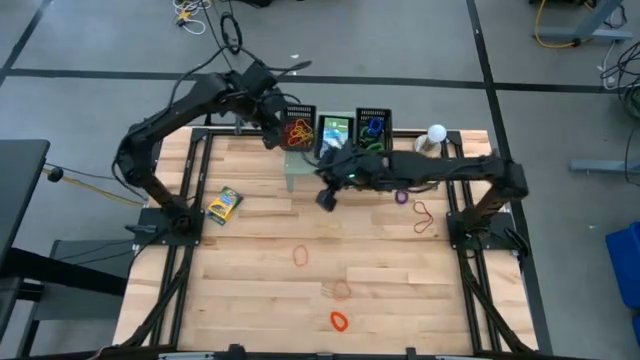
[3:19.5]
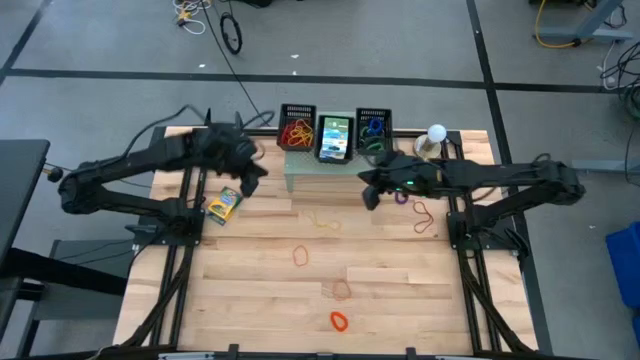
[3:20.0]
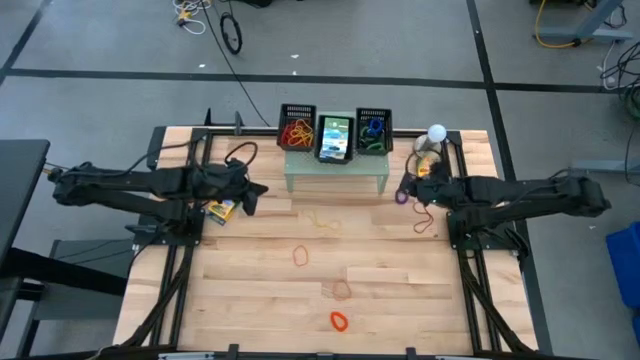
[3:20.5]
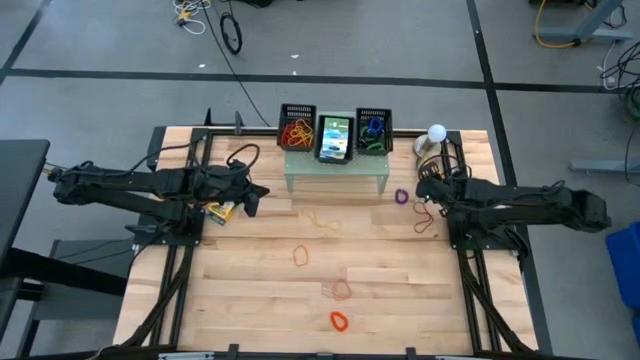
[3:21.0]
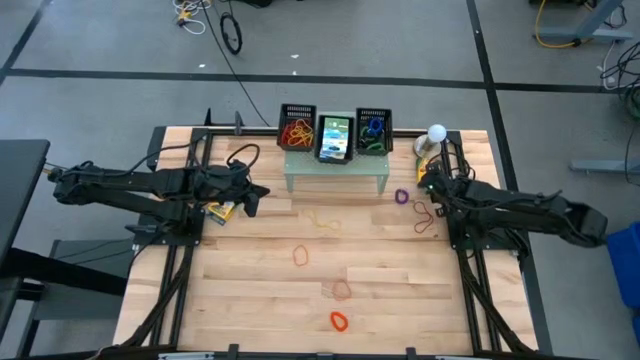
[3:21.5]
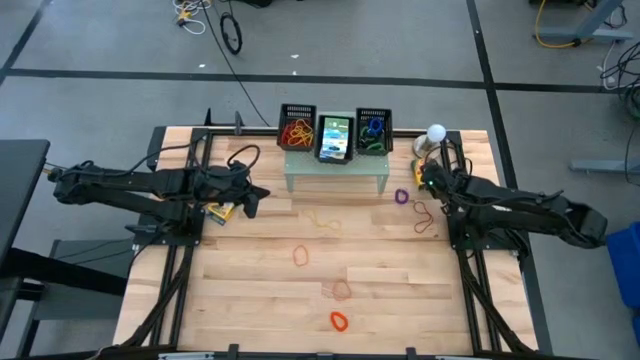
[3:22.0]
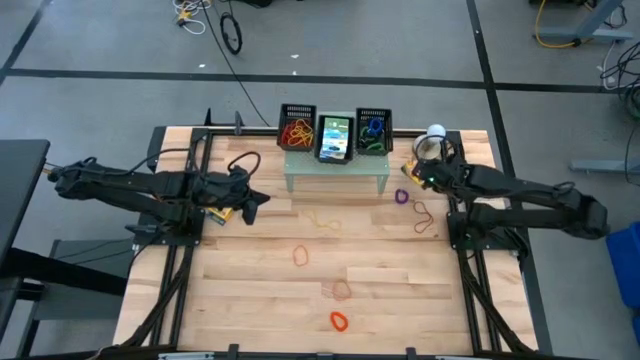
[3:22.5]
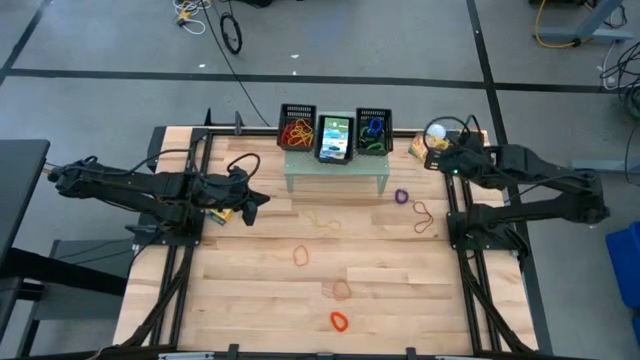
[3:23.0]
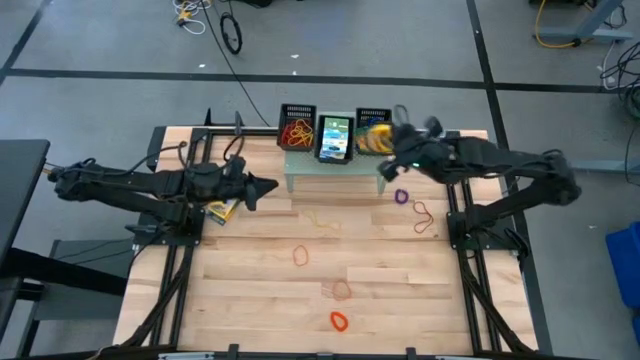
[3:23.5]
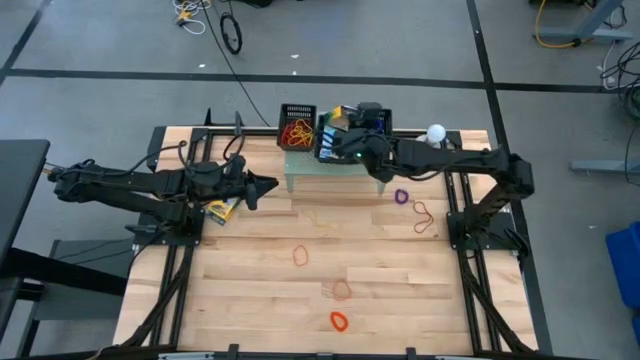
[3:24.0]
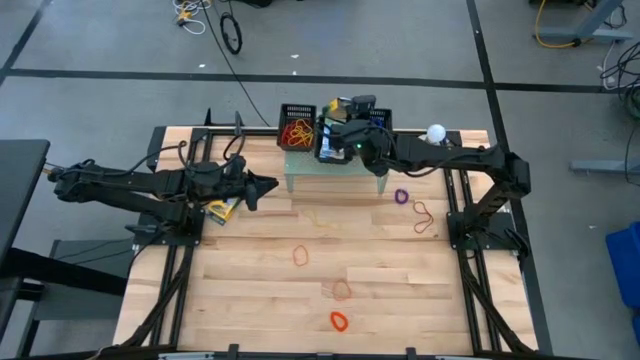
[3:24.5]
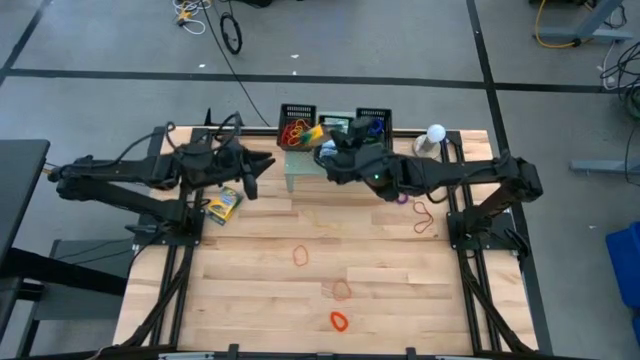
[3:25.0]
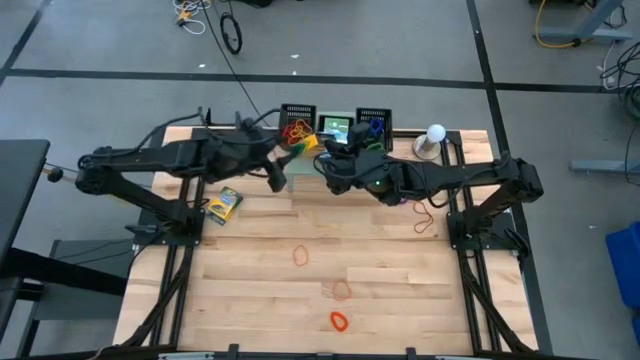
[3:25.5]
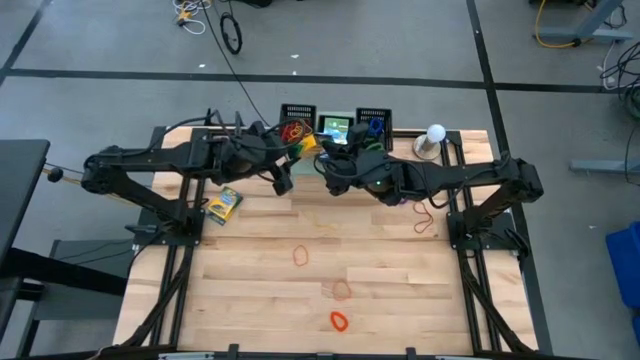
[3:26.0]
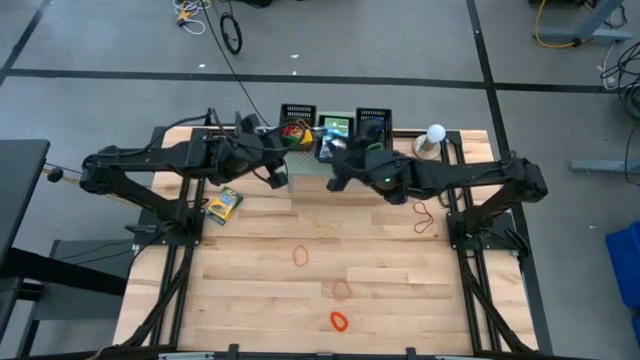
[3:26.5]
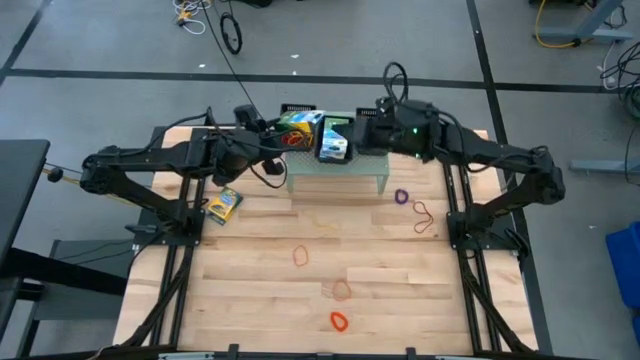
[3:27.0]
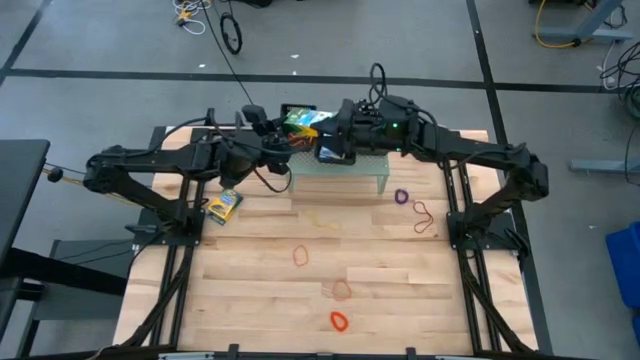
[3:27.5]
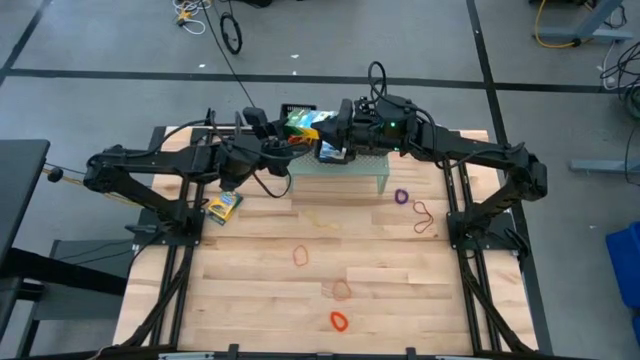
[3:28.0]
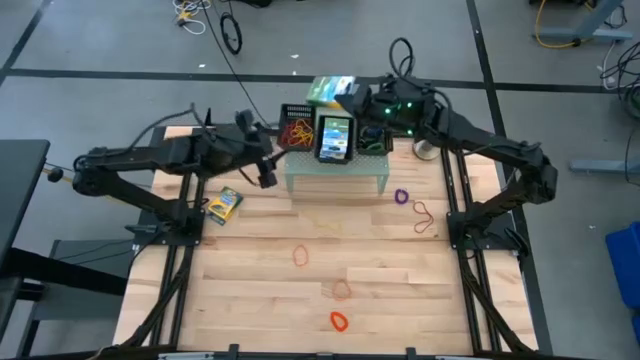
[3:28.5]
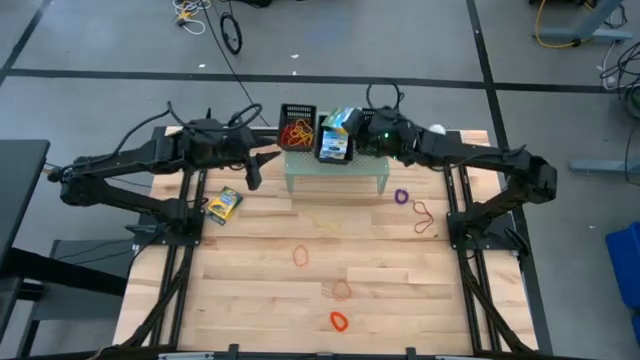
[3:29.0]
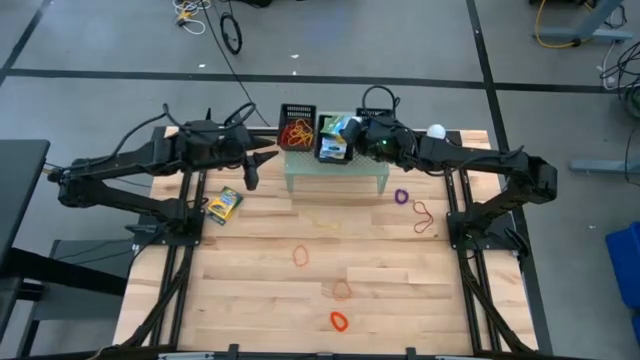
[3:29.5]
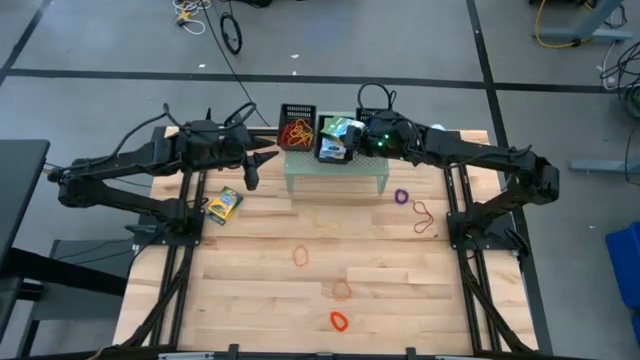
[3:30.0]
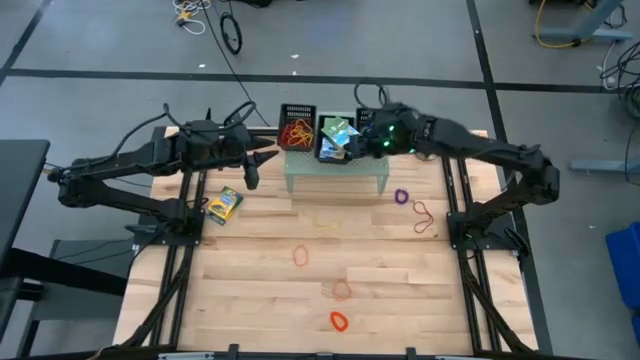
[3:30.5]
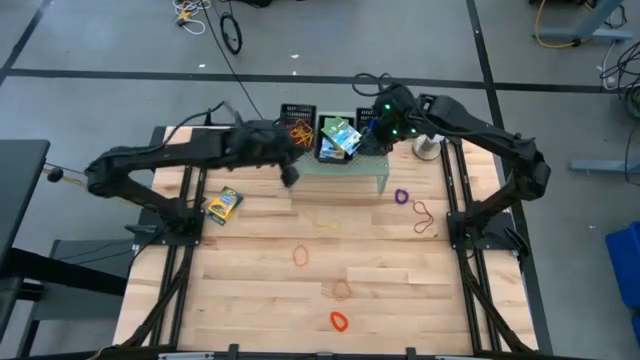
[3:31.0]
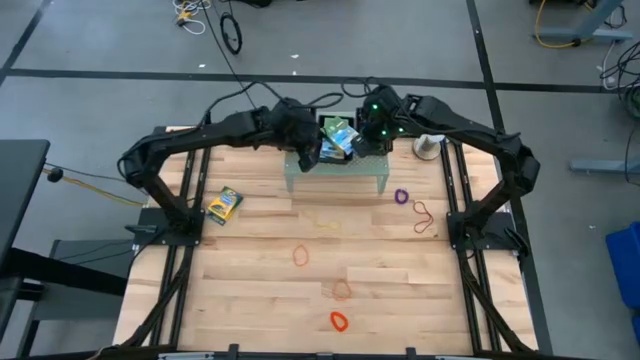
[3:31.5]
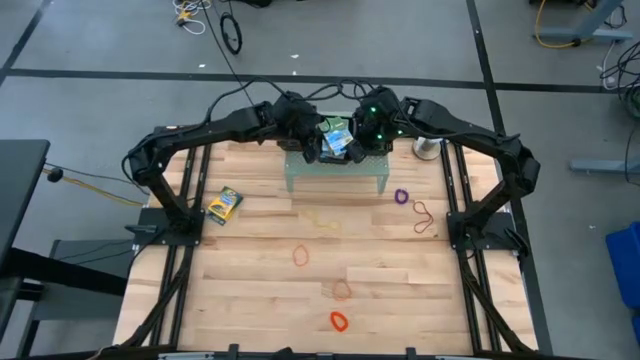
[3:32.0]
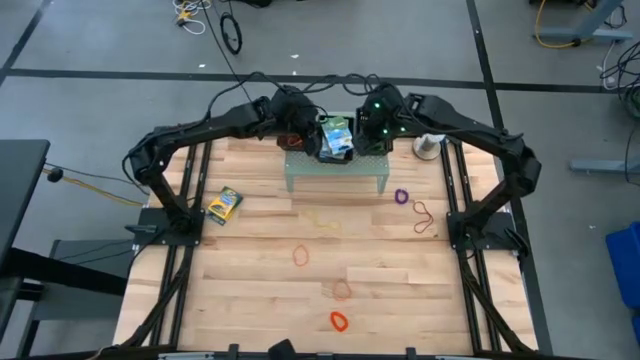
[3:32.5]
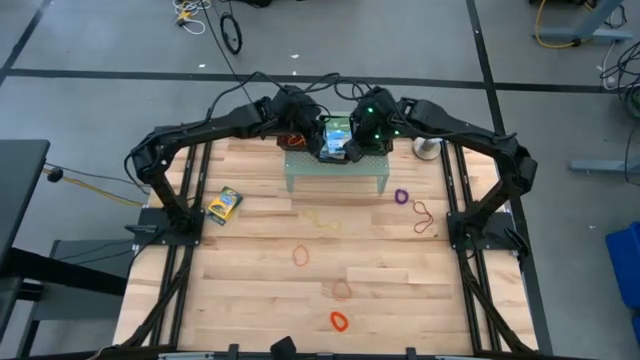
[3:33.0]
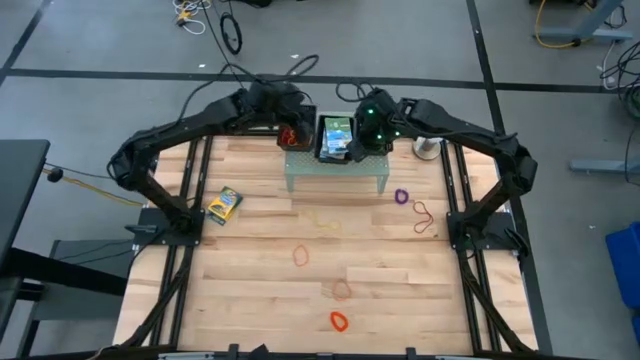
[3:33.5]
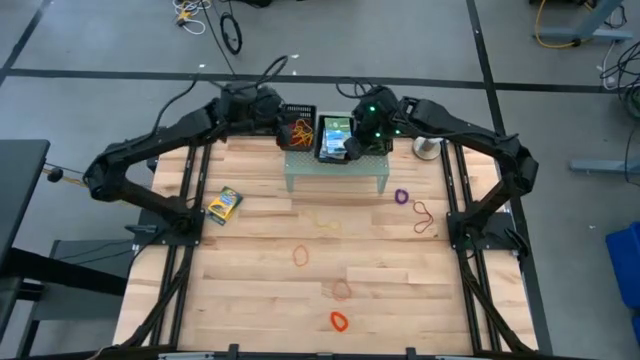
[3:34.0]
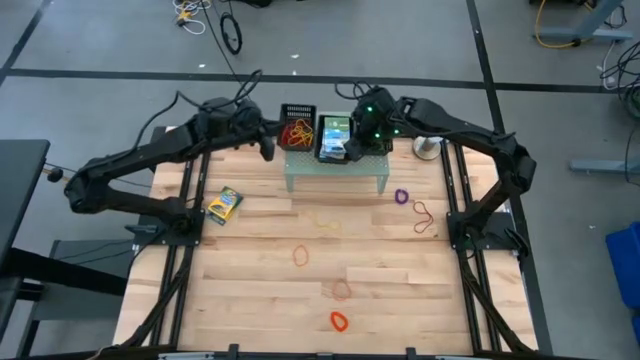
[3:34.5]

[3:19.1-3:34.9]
Task: Pick & Place Office Desk Supplies
Put the crayon box on the middle black bin on the shelf

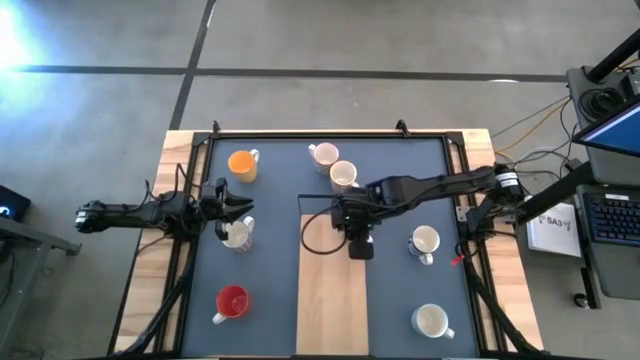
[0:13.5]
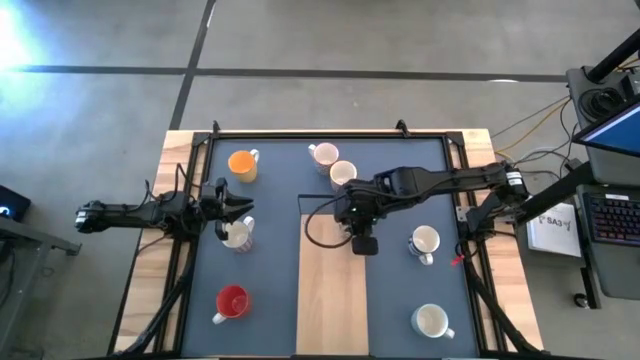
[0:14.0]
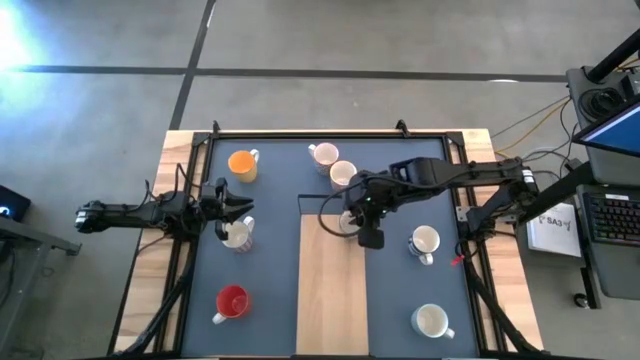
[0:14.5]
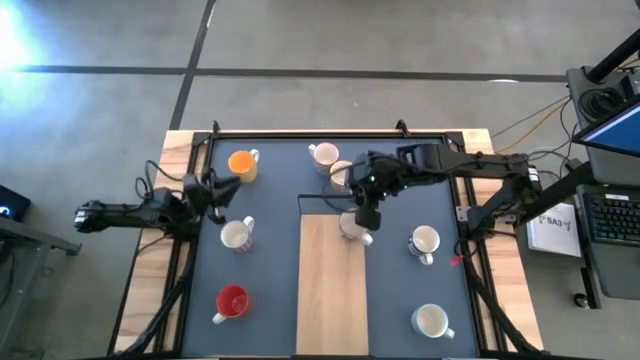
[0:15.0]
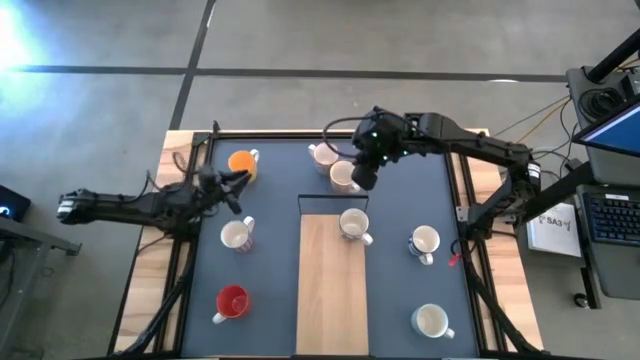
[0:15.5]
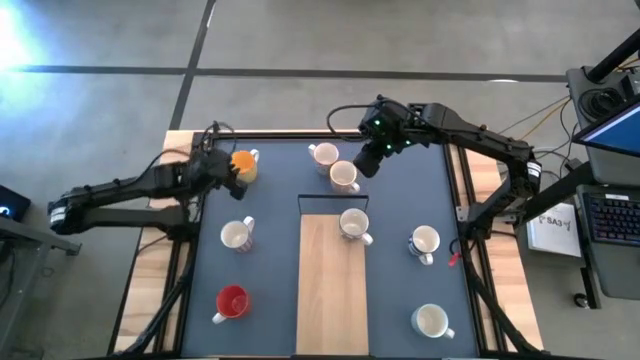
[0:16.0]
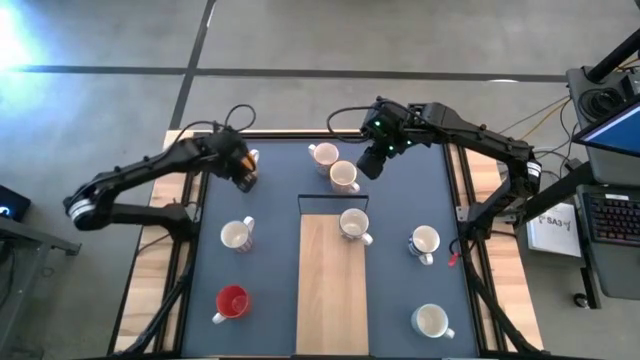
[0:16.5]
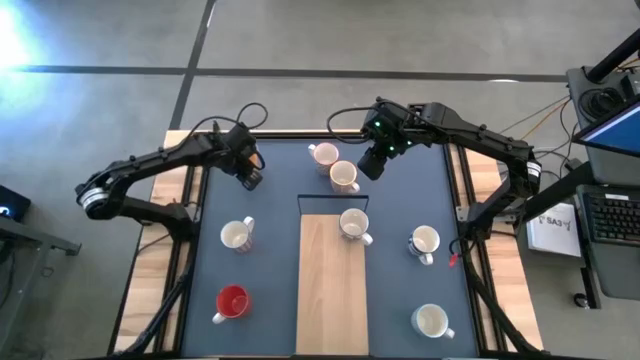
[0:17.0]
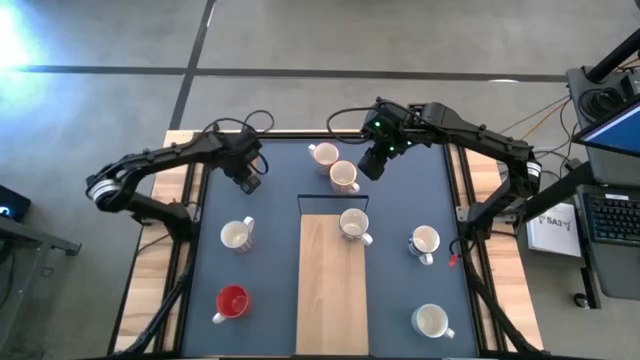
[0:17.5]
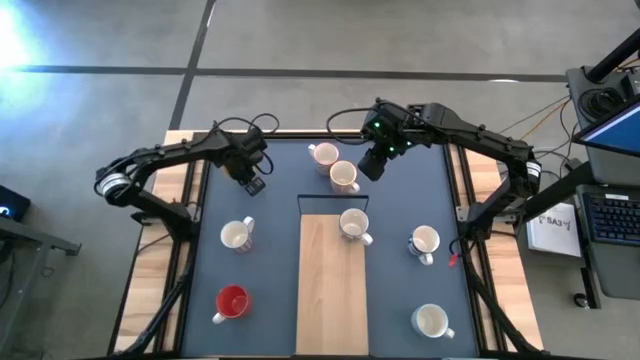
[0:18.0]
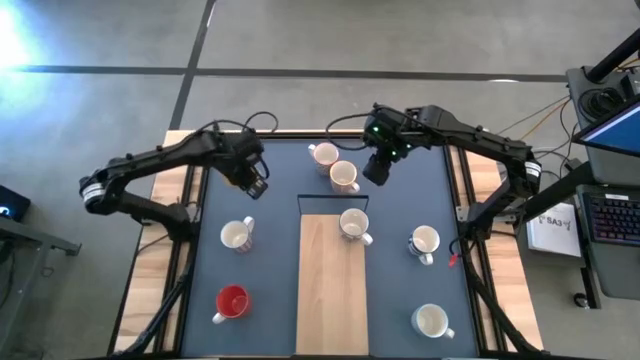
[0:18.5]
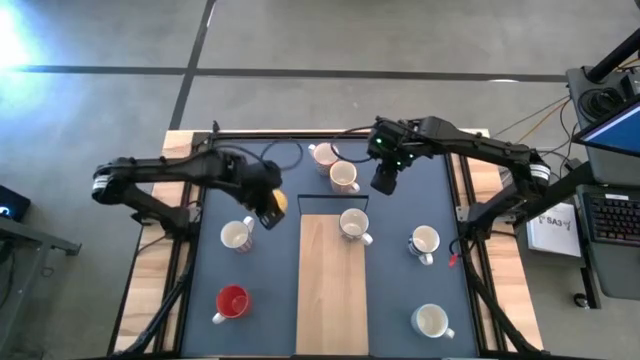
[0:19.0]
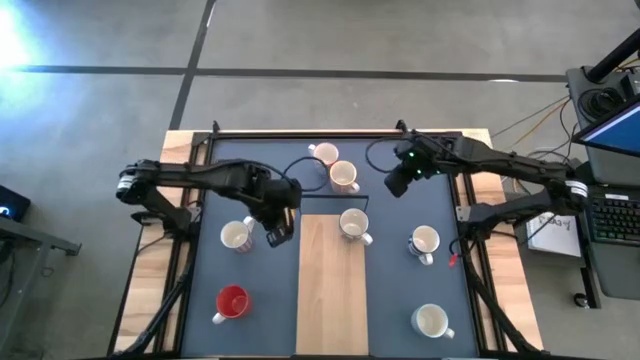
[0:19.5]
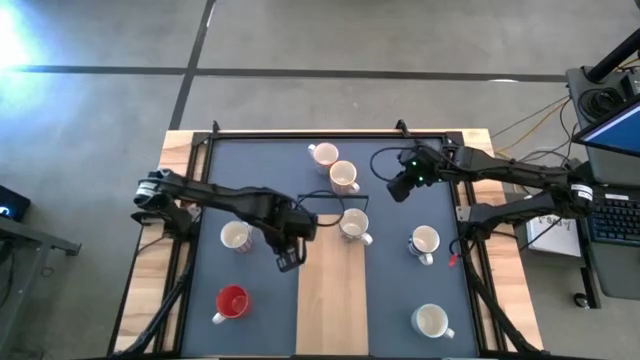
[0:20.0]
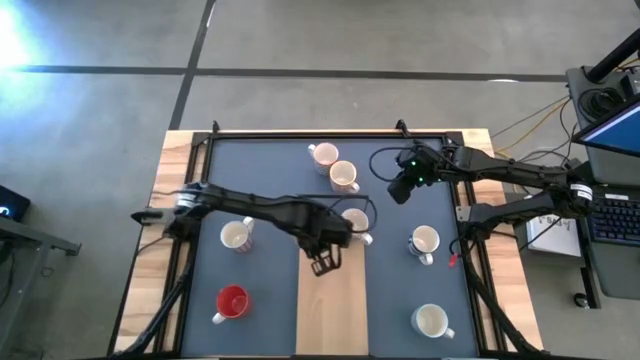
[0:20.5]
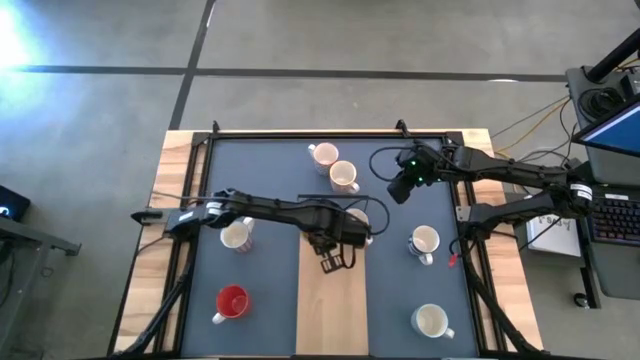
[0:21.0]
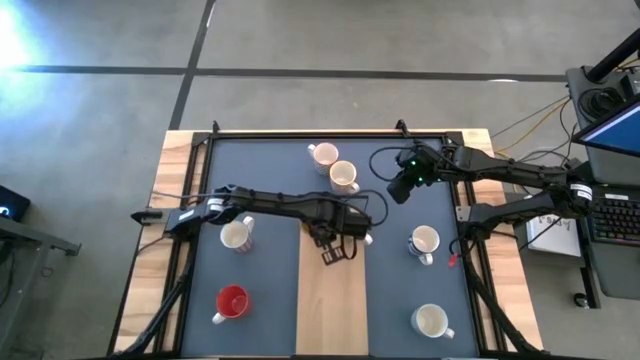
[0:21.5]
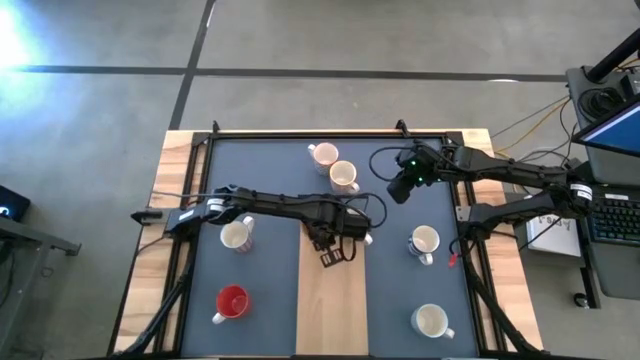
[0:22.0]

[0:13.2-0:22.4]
Task: Place coffee mugs
Put the yellow mug on the shelf
